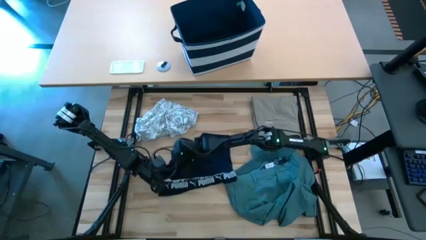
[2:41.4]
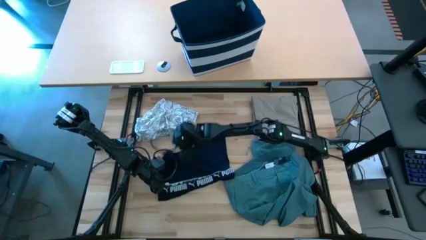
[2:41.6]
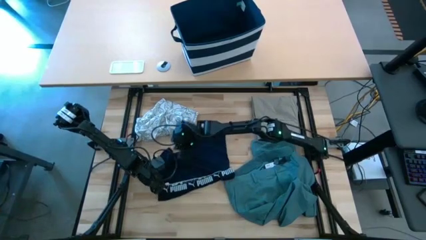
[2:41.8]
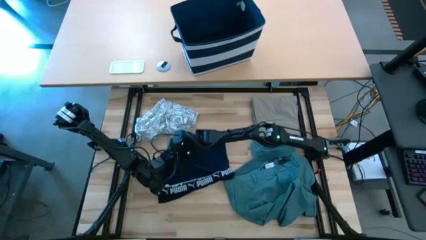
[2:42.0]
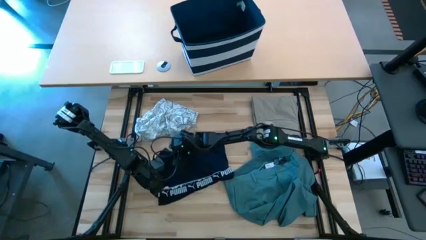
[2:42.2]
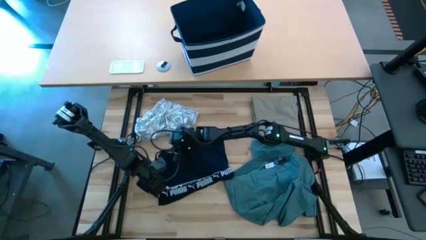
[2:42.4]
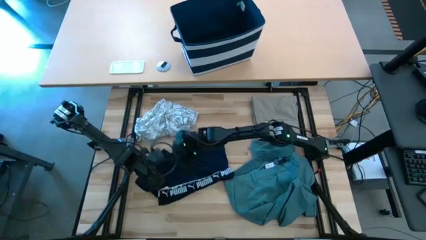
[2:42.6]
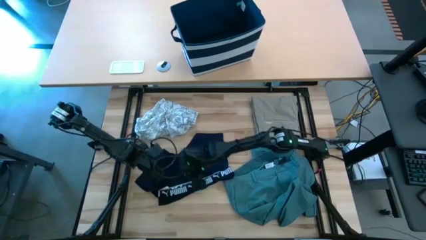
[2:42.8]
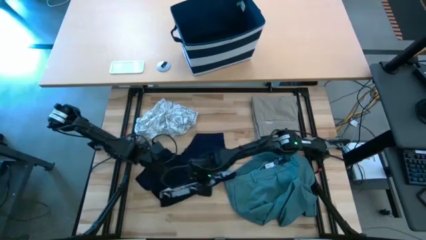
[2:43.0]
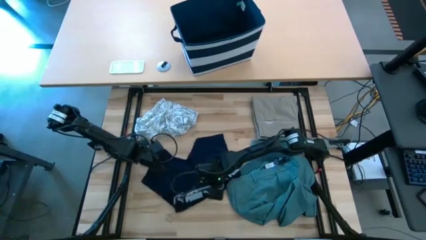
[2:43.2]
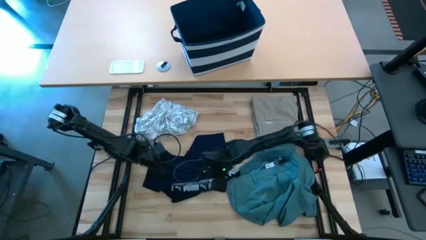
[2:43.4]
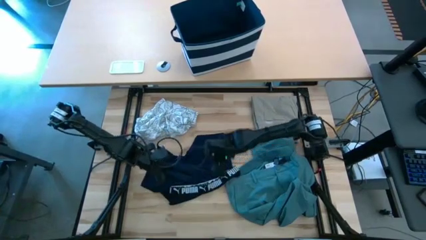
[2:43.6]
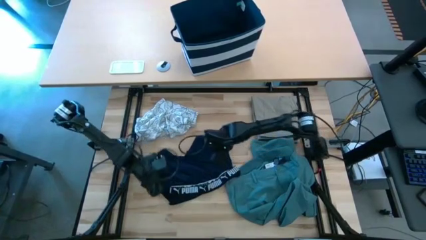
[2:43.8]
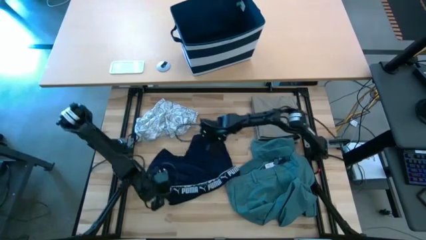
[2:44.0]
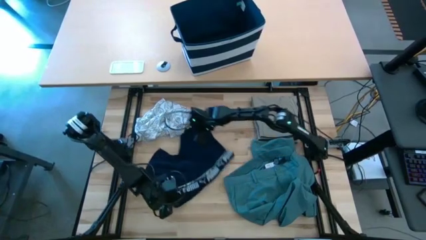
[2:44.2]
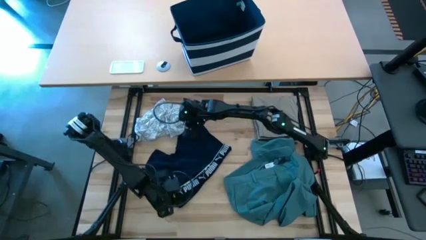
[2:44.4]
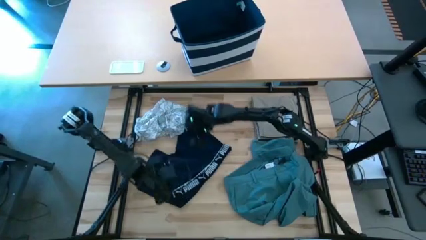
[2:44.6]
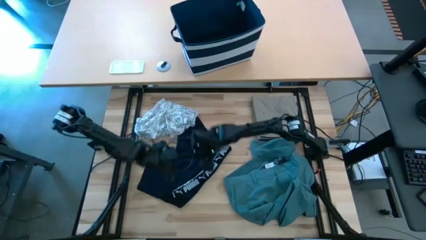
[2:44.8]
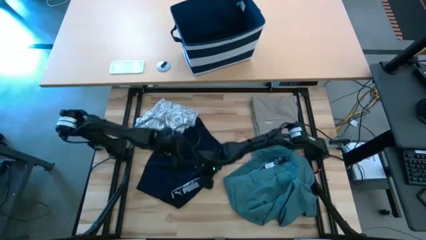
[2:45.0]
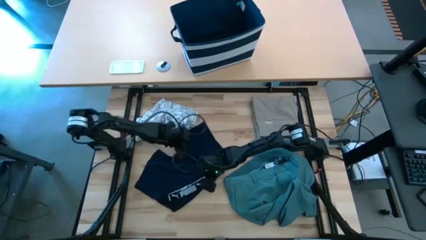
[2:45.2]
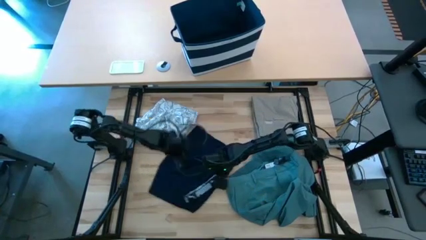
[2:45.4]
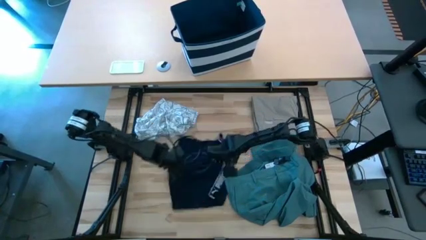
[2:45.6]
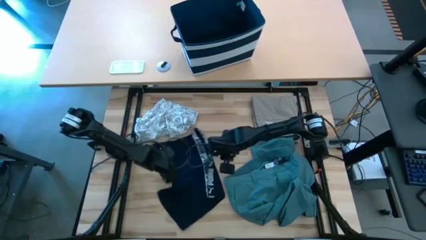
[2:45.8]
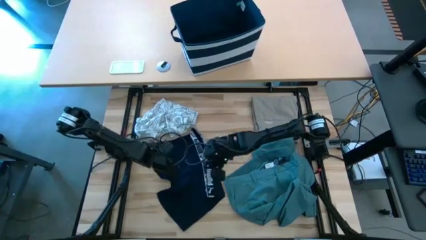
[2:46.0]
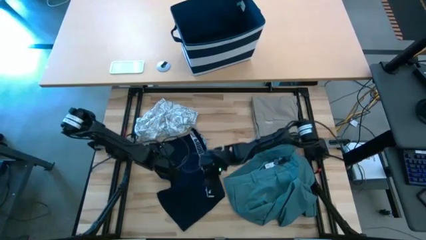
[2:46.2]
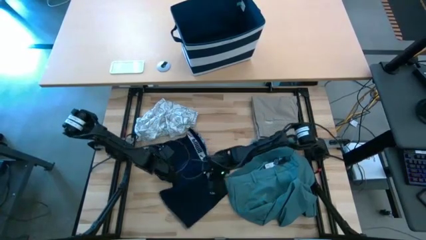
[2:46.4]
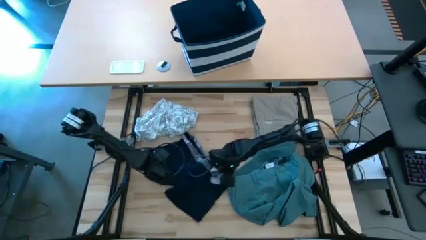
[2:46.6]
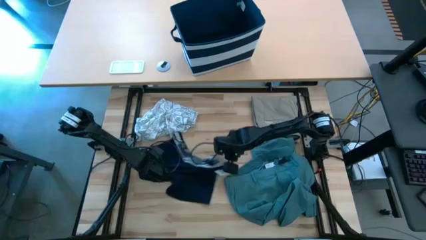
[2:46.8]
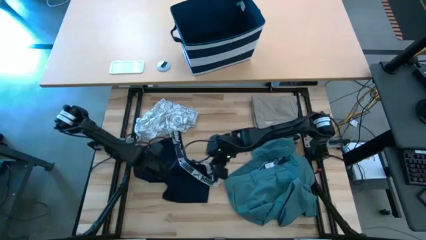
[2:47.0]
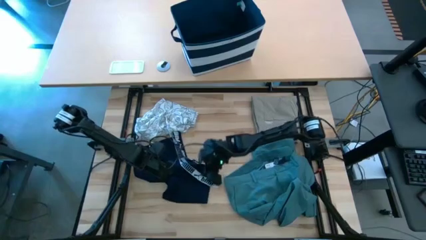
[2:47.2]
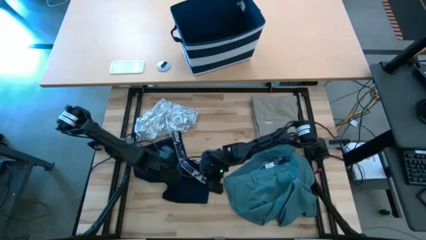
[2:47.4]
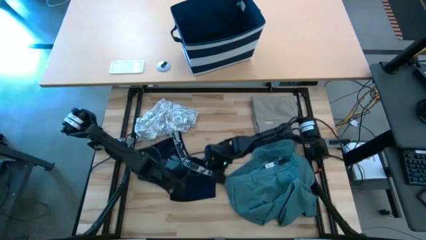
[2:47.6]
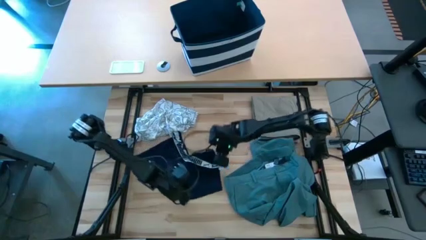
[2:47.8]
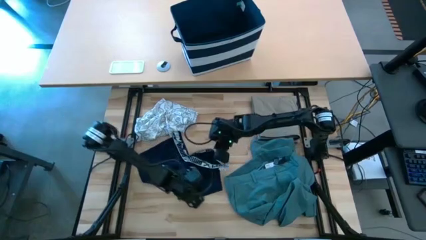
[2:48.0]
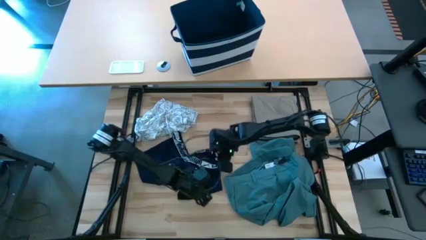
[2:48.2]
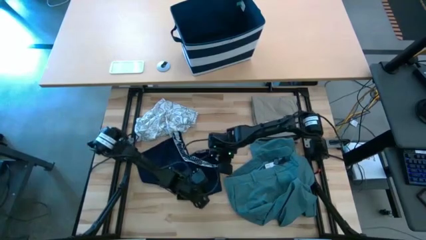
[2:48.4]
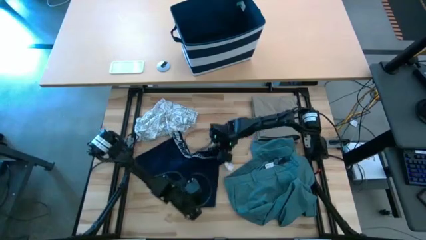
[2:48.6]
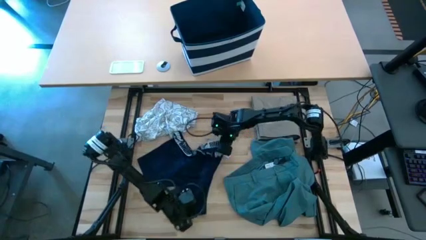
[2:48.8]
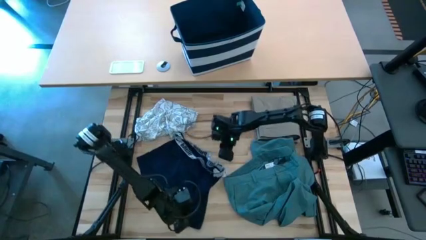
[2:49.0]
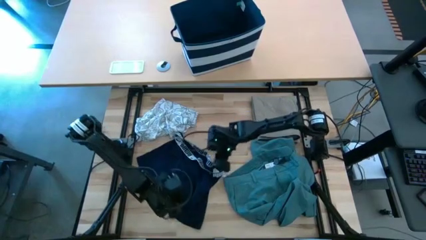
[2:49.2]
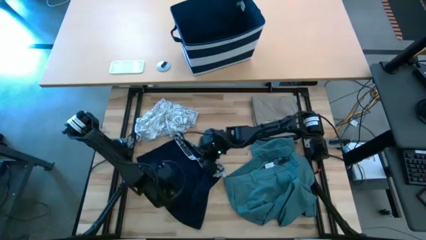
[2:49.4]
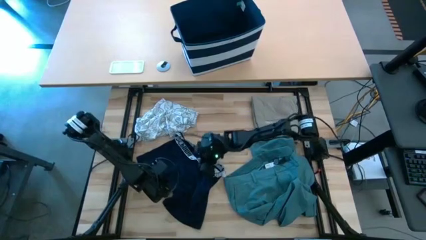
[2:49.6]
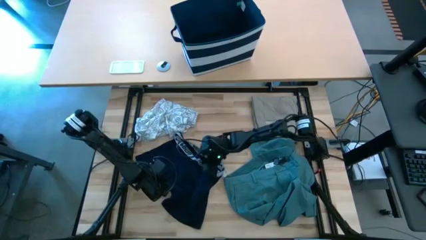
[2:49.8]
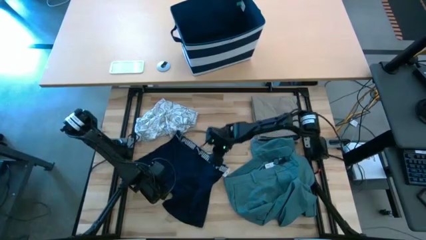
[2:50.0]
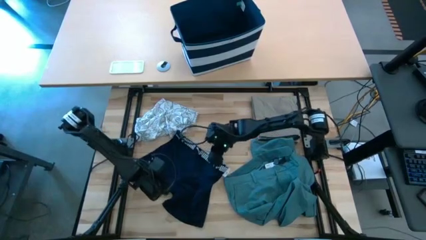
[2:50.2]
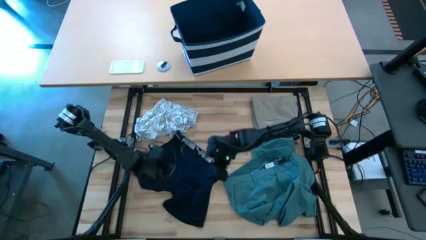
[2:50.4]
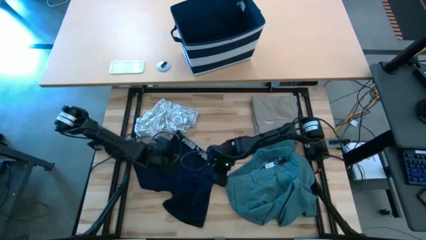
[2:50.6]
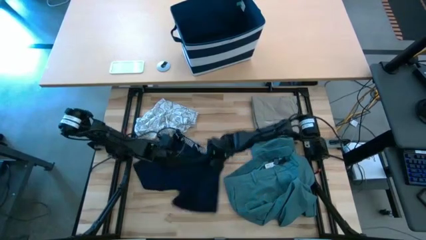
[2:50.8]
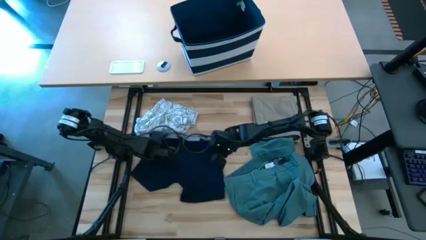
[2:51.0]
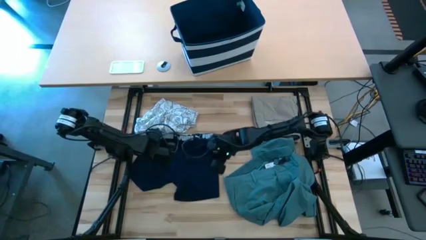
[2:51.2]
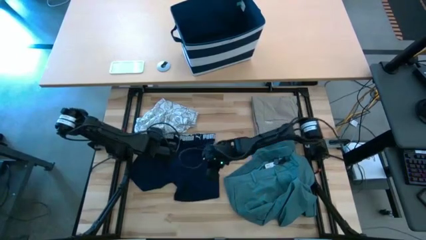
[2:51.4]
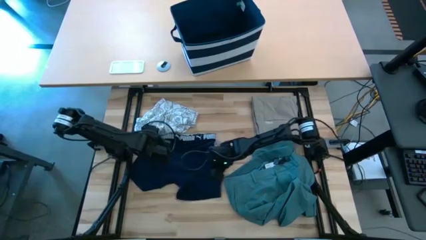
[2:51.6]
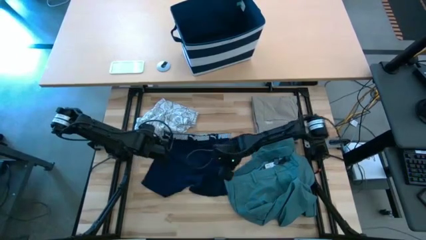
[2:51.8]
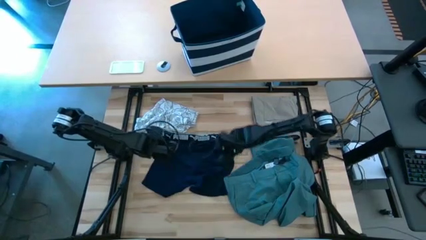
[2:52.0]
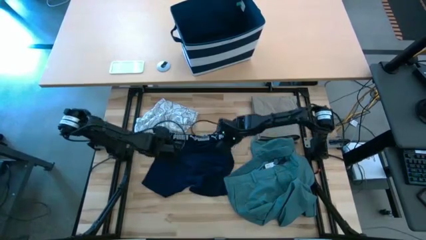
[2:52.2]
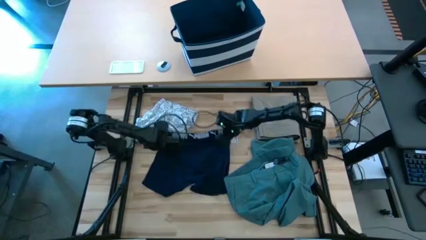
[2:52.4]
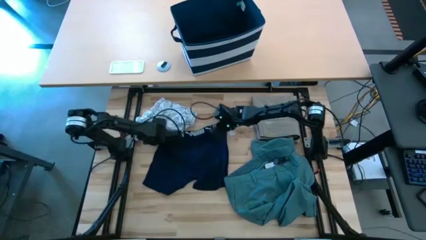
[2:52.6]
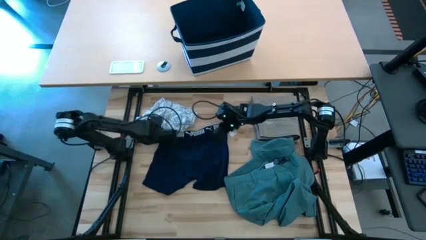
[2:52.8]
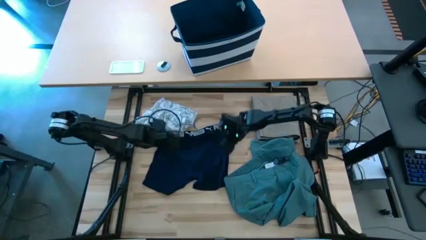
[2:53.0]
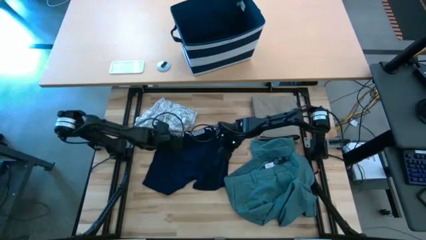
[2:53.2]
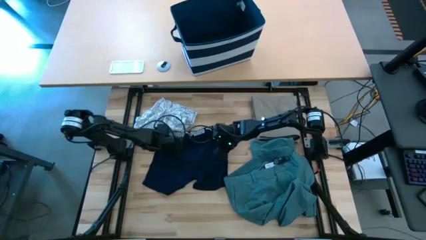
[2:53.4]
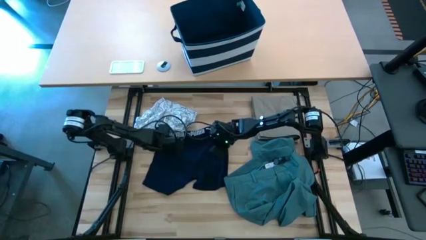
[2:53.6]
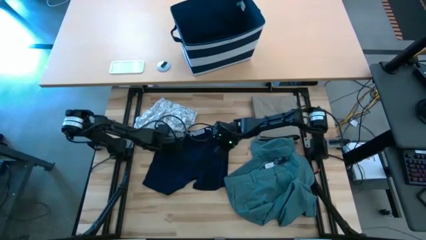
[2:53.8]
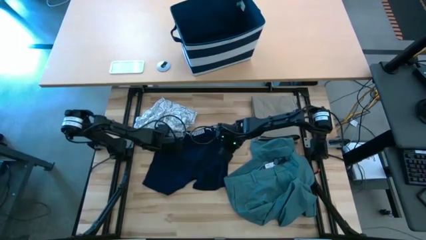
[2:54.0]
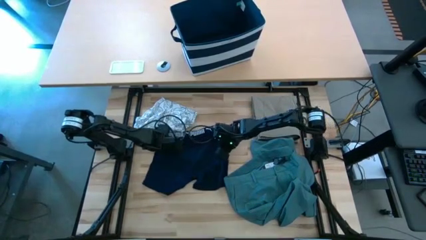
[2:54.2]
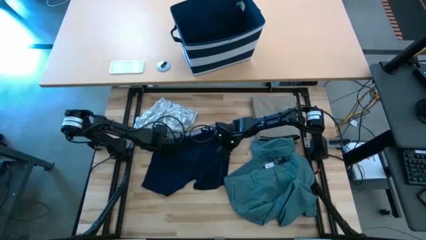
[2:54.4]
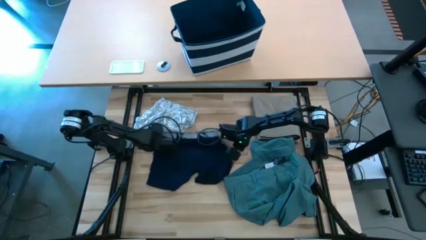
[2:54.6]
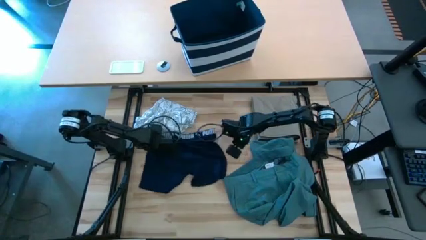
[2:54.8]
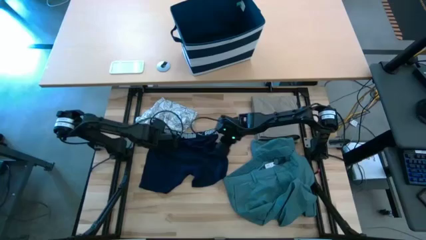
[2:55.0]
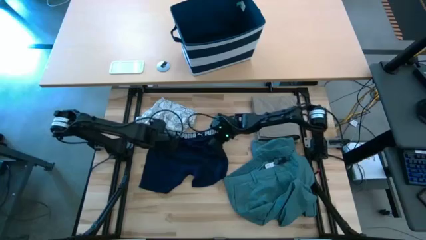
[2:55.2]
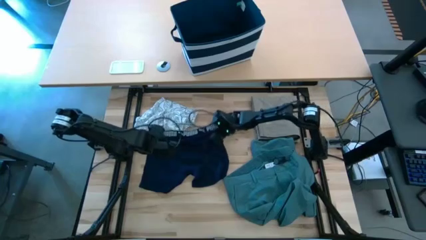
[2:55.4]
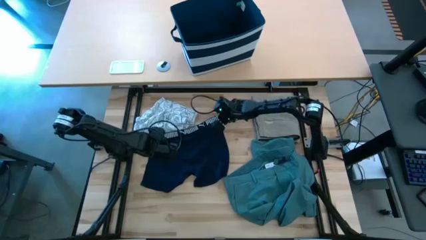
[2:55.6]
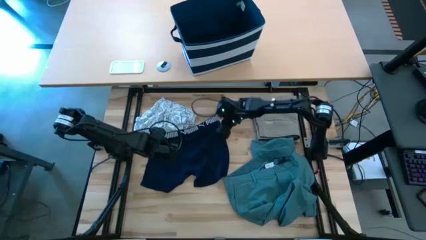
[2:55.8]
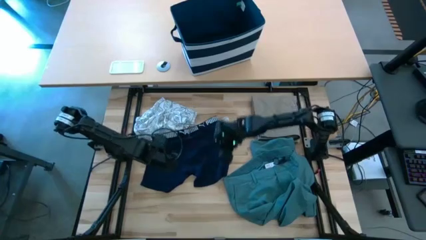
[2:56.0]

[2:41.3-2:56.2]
Task: Fold Laundry from Bin
Fold the blue boxer

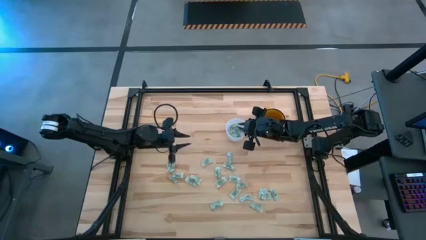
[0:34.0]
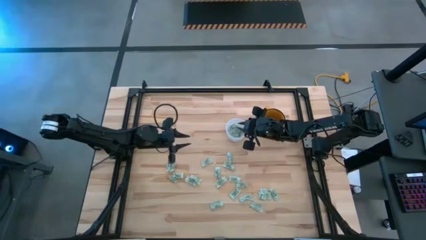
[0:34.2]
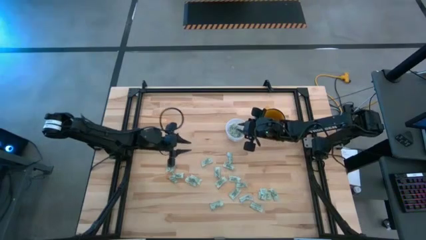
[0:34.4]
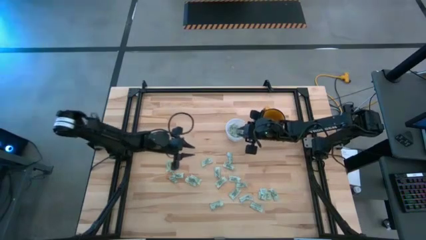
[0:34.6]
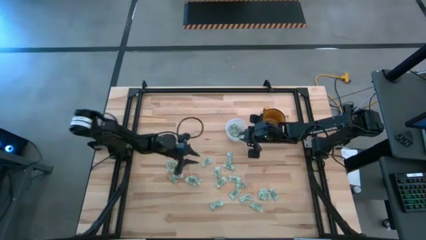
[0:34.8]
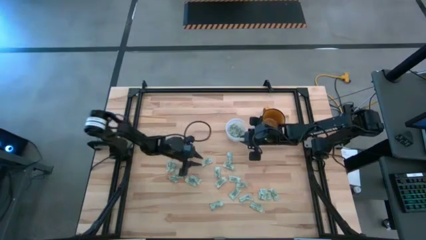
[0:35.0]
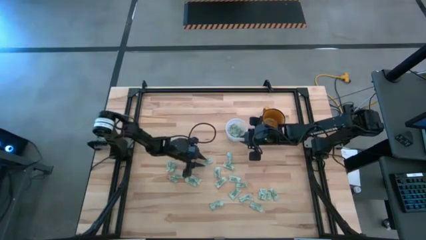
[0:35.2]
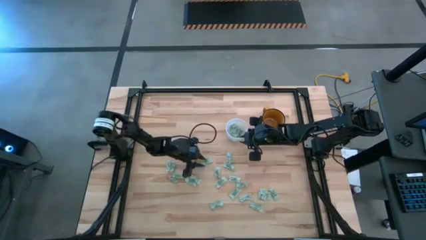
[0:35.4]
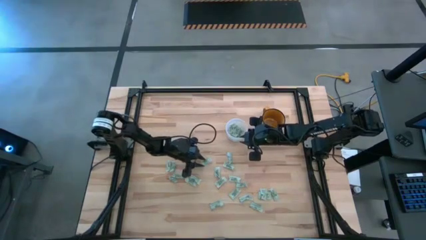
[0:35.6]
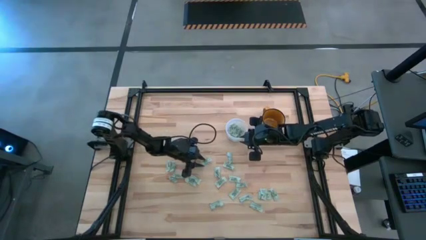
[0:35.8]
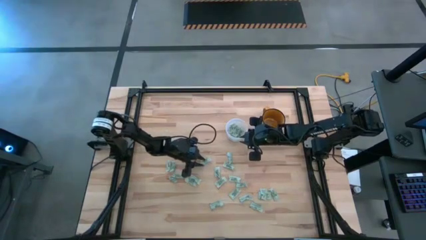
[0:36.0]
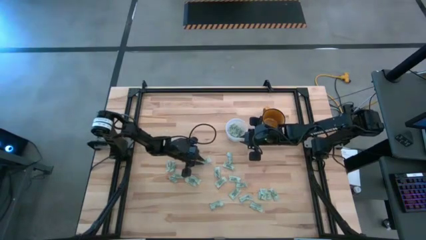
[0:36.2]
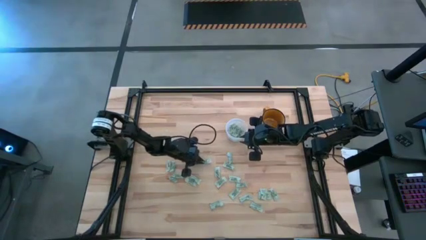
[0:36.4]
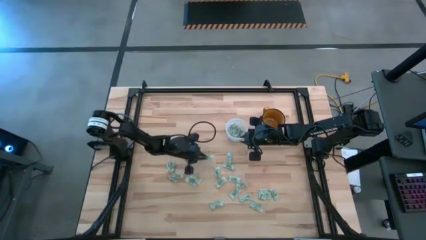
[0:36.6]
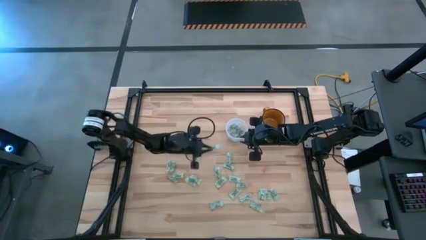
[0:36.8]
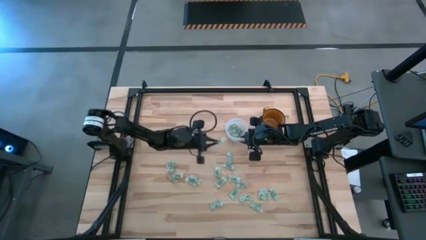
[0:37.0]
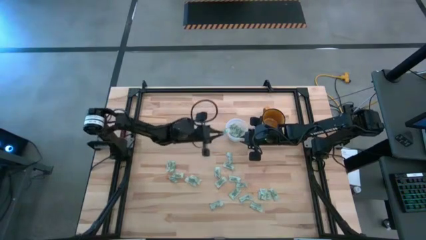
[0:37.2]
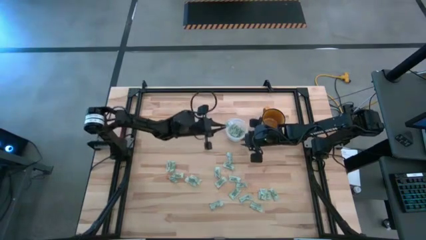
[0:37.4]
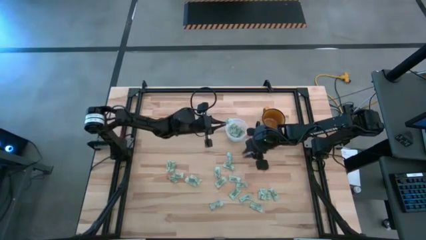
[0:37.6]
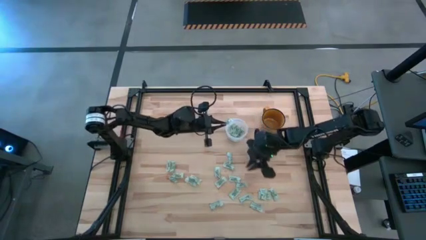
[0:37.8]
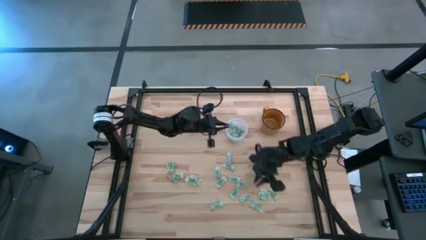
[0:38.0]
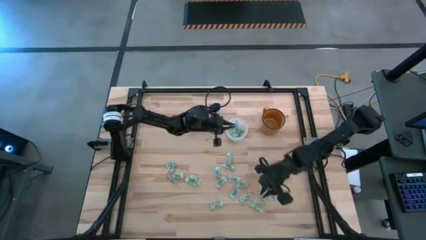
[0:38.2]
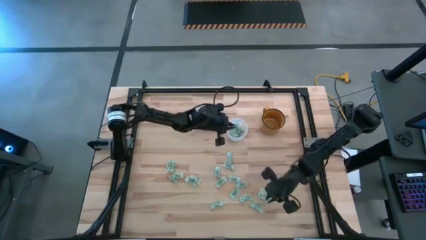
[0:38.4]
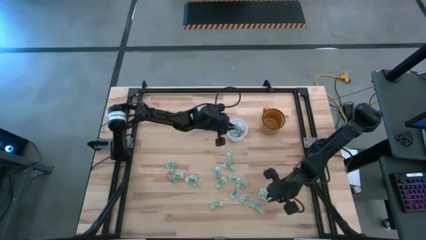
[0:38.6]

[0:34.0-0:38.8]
Task: Pick and place Stevia / Truvia into bins
Put the green stevia packet into the transparent bin
